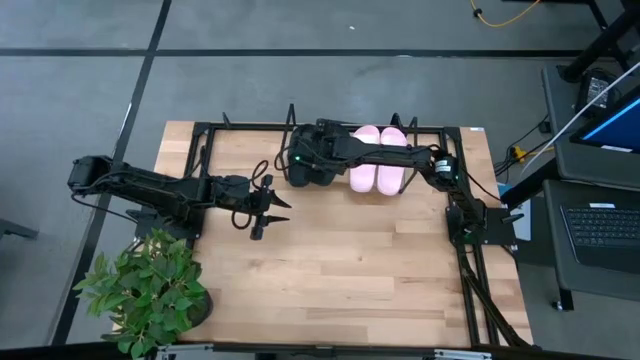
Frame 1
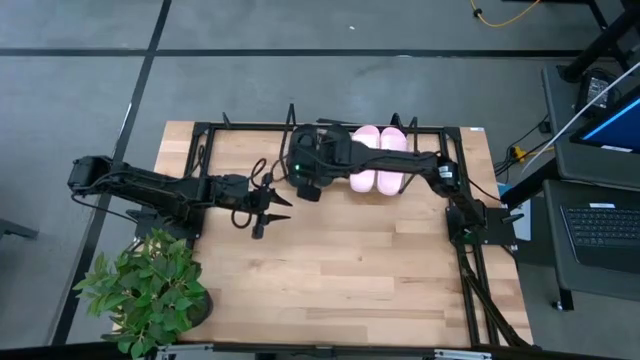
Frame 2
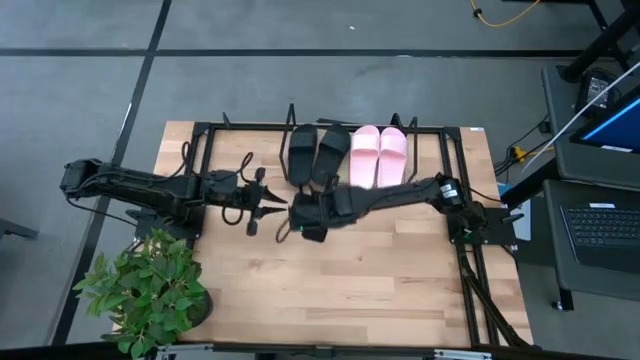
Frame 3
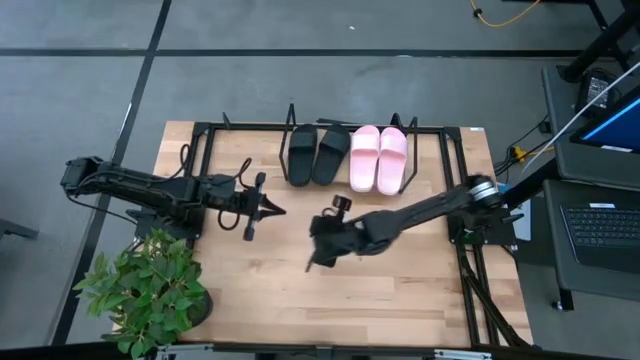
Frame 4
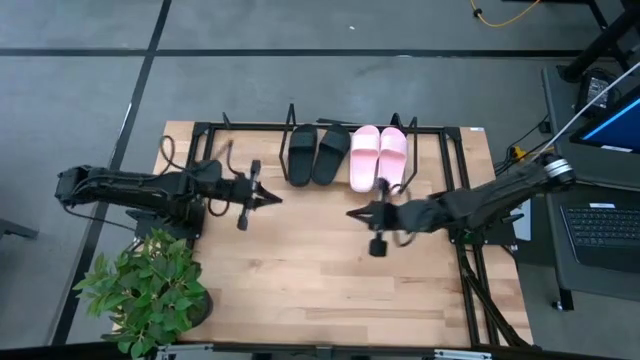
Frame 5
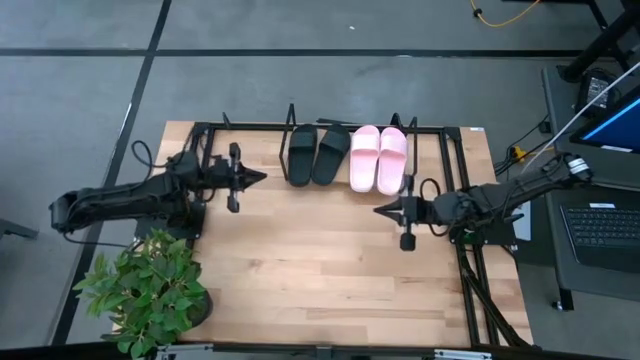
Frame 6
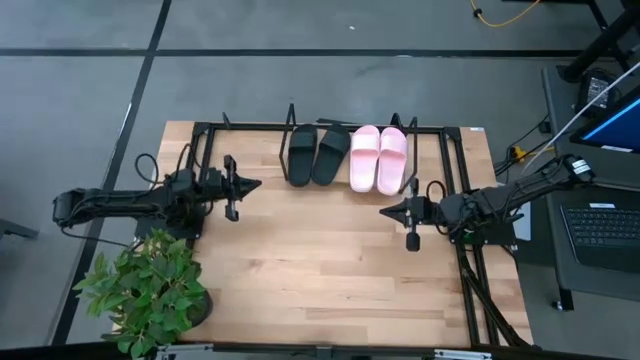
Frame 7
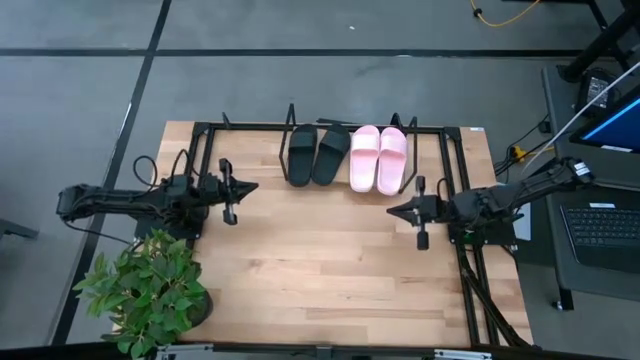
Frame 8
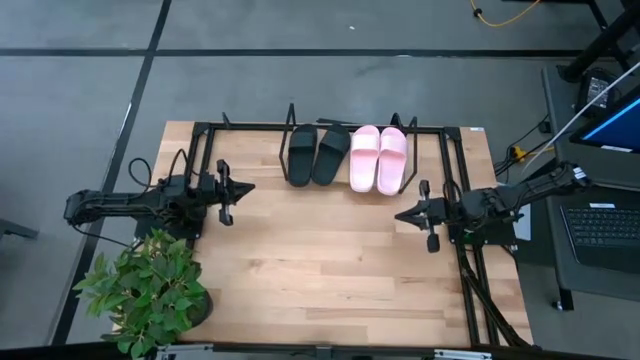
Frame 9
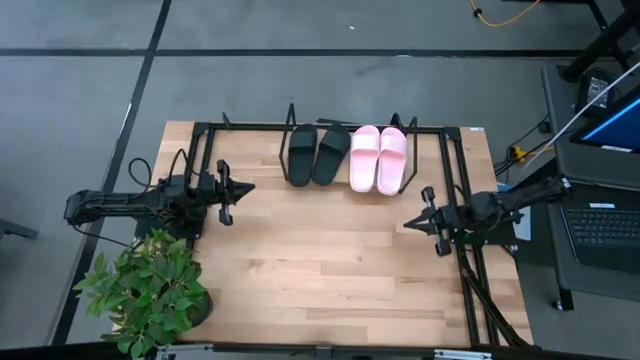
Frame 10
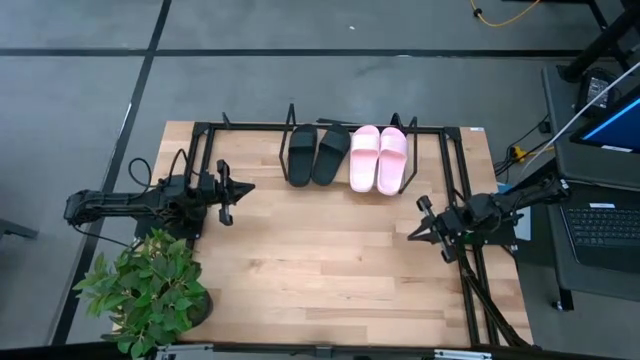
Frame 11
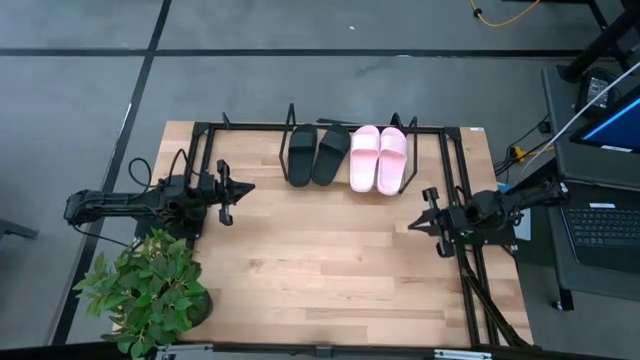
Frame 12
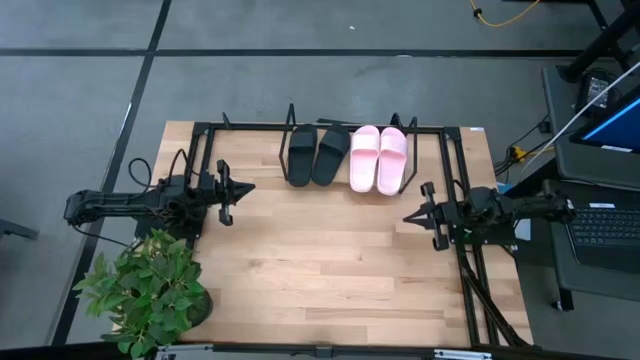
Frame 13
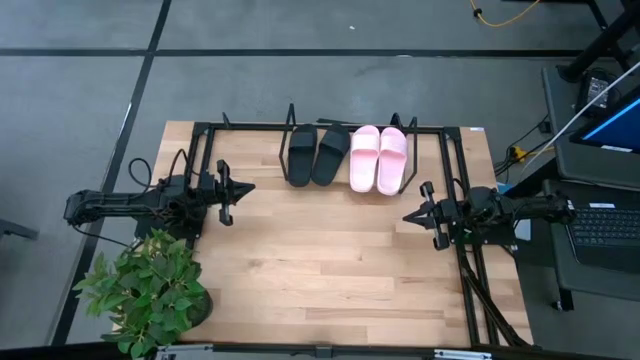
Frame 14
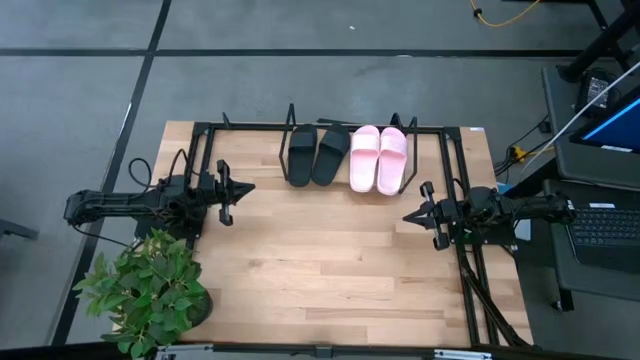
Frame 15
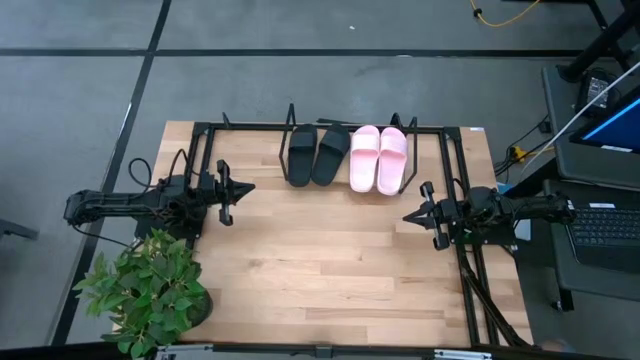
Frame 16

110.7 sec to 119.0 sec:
Task: Pick and place slides into the shelf
Return to Home Position

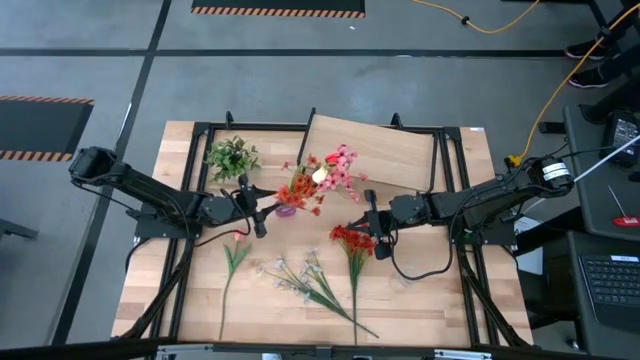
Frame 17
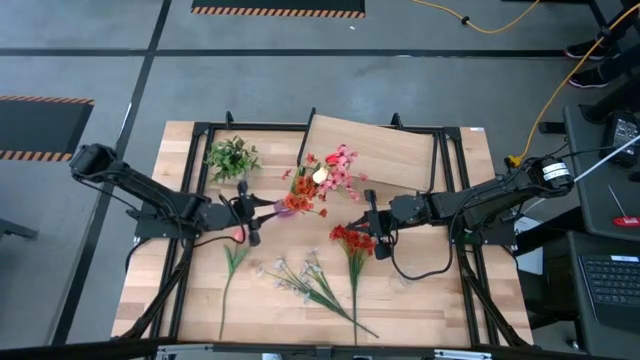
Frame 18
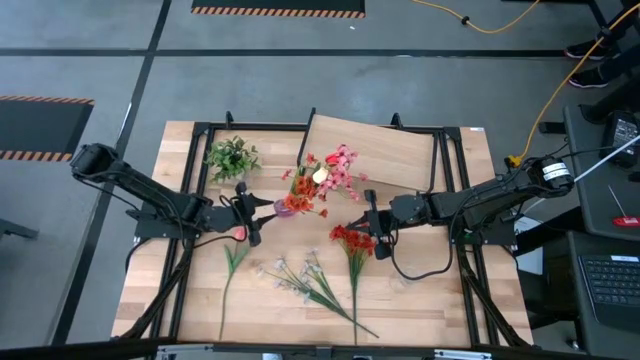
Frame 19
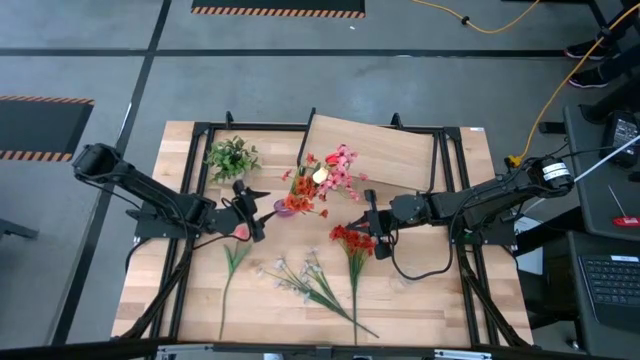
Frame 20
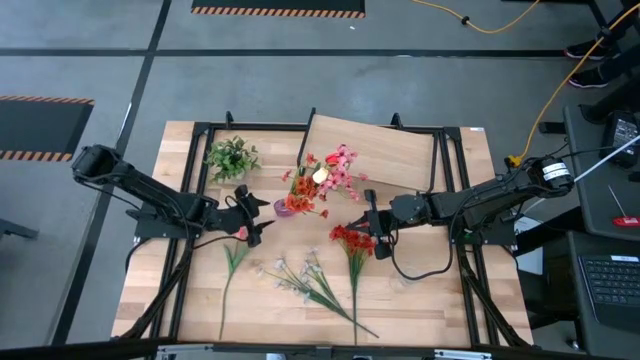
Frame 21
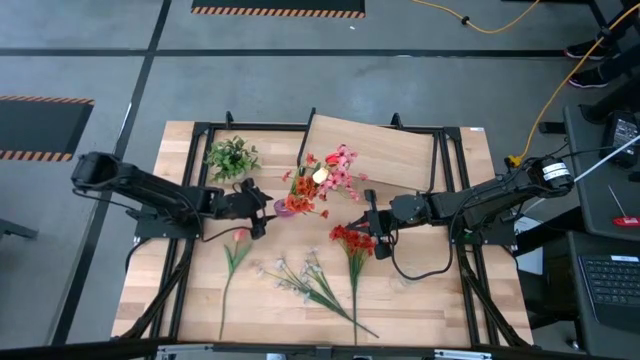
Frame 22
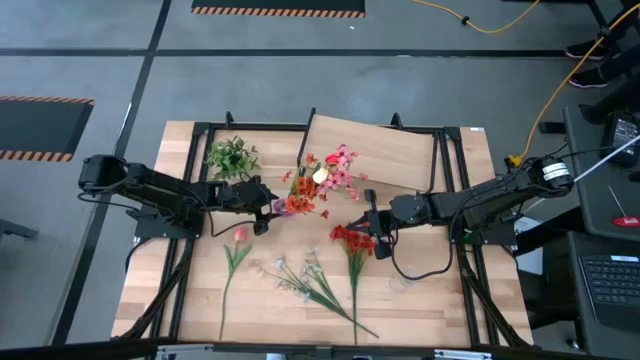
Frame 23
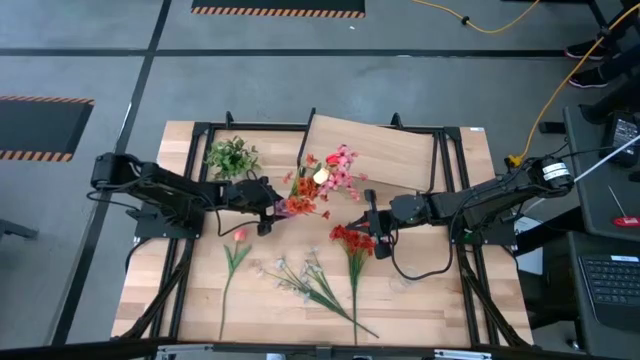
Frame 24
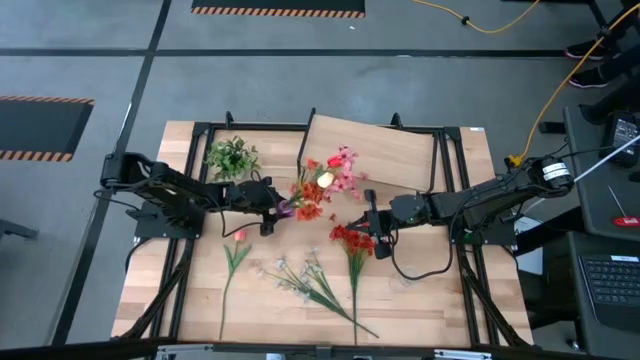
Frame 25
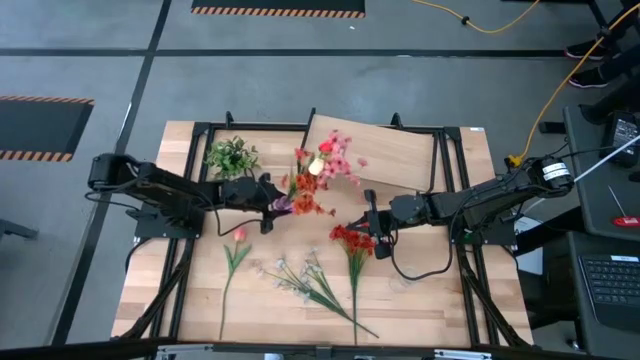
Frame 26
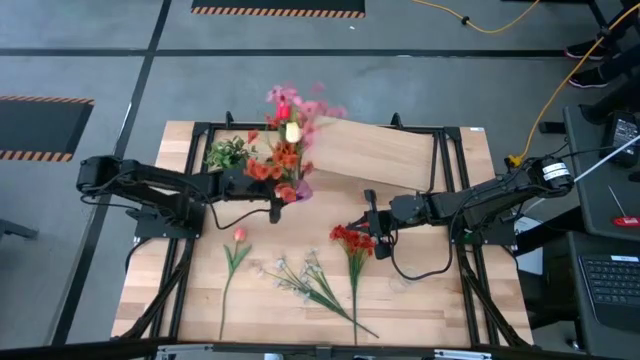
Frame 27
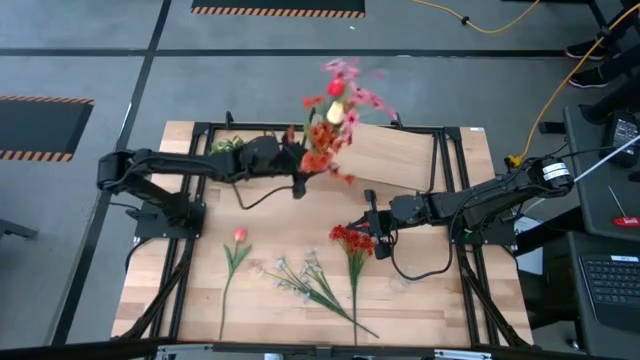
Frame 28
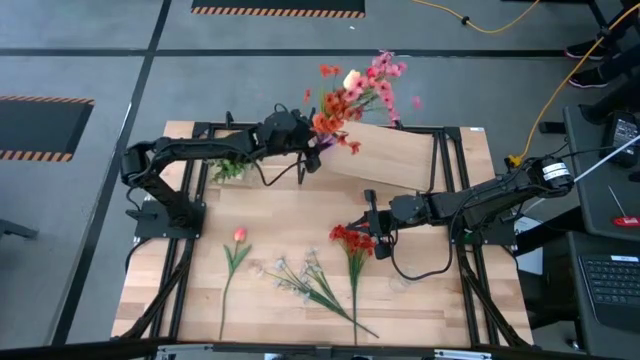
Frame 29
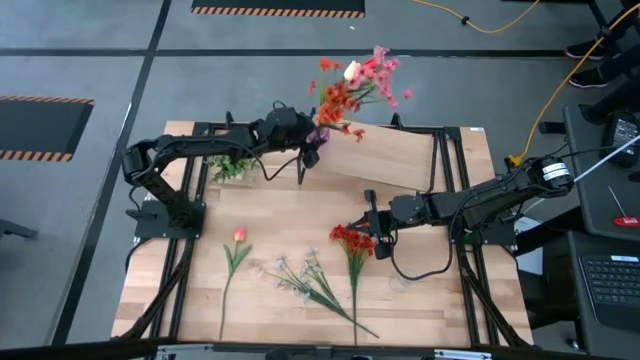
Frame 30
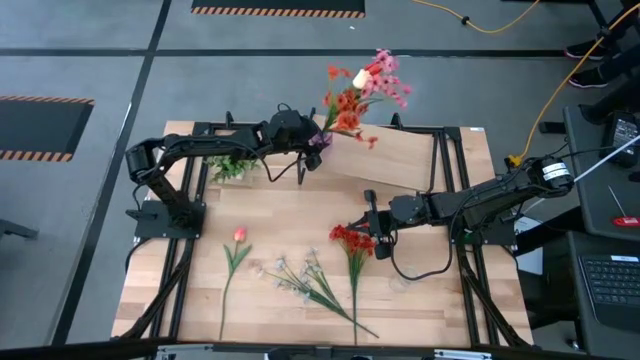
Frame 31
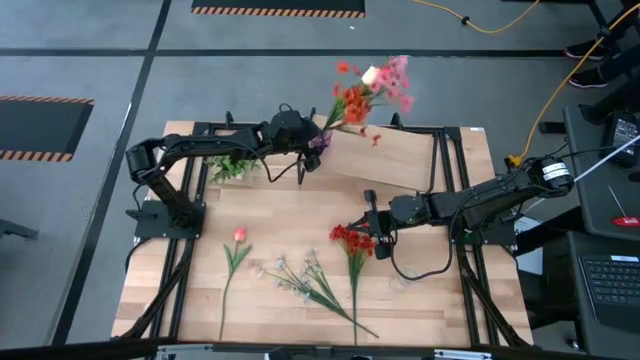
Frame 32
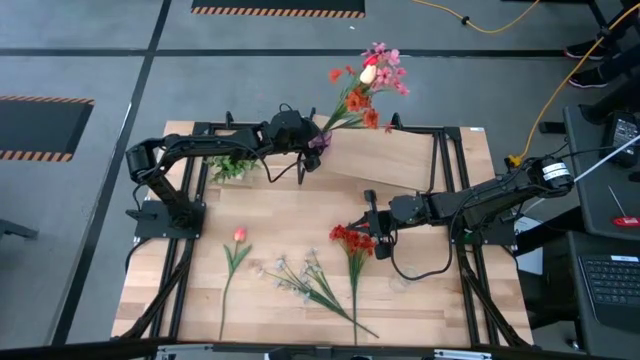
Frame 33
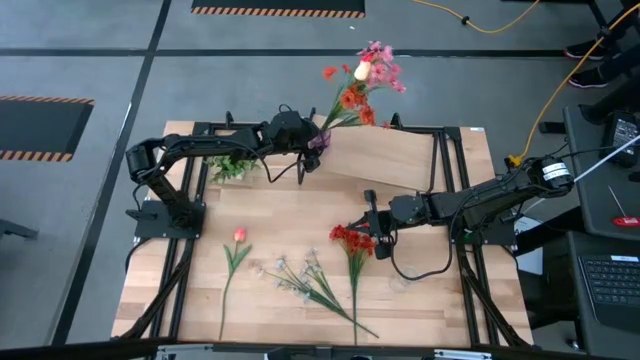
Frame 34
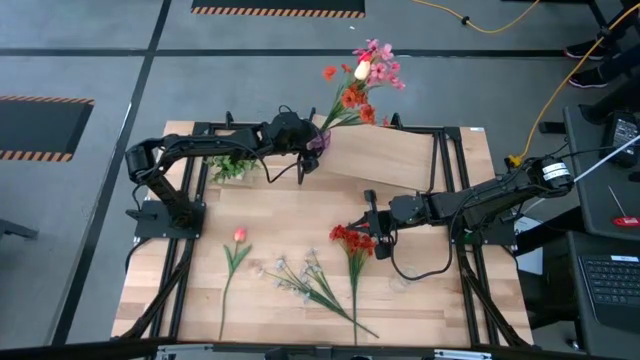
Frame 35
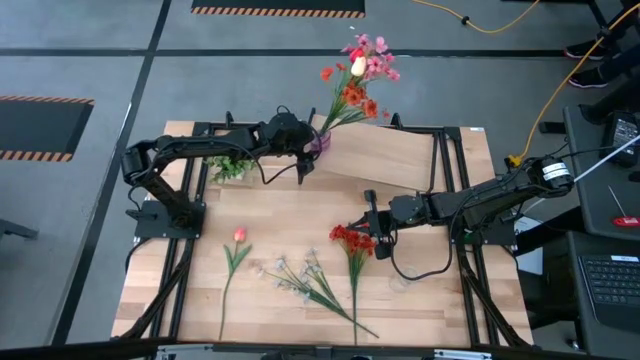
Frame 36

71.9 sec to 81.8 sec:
Task: Pick and place flowers into a vace then onto a shelf
Put the purple vase with the flowers on the shelf
